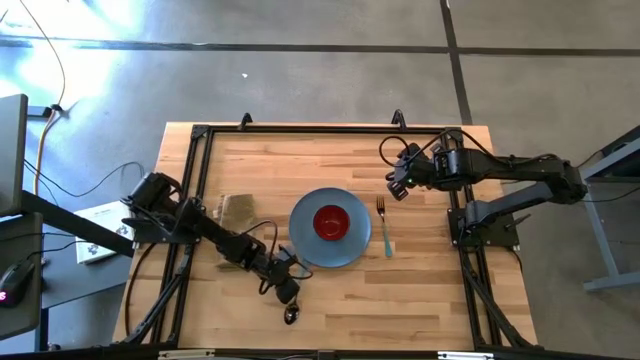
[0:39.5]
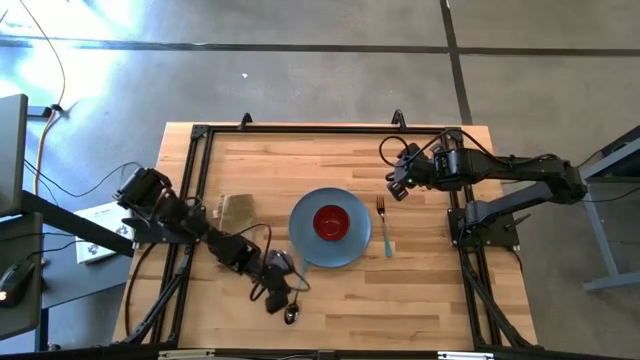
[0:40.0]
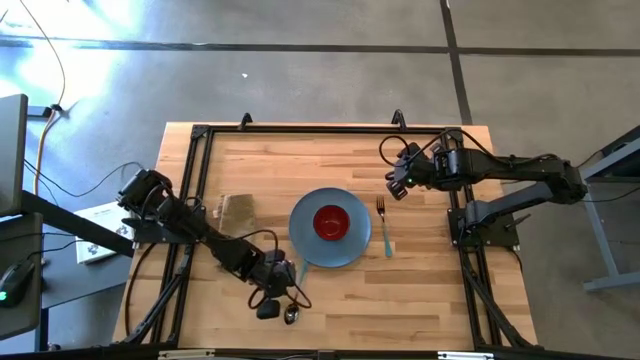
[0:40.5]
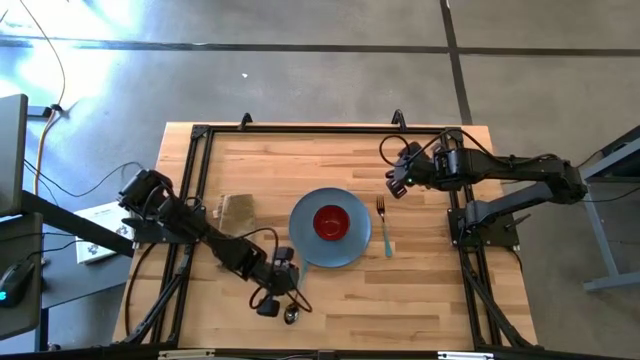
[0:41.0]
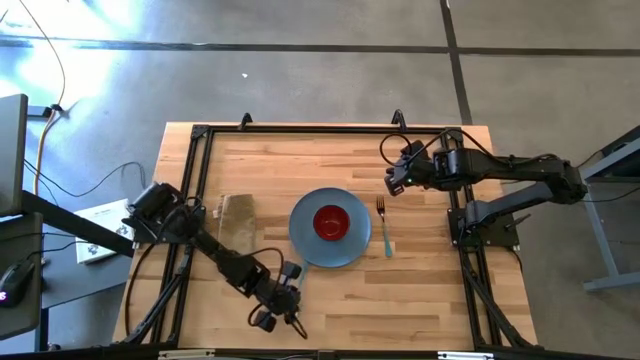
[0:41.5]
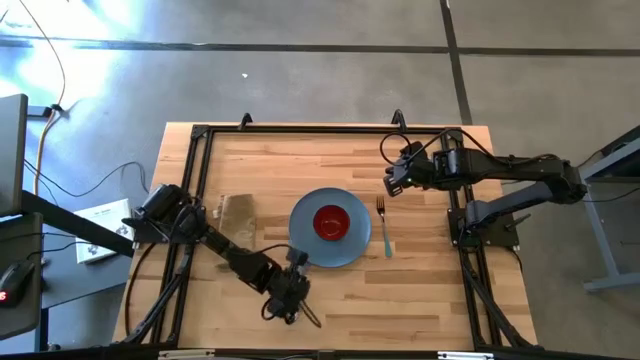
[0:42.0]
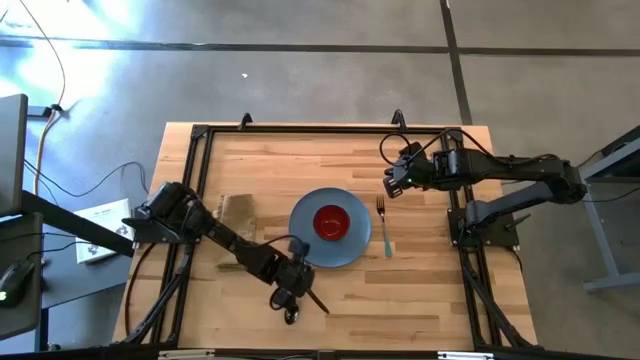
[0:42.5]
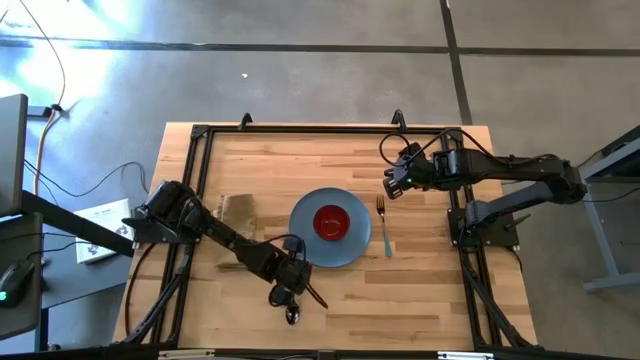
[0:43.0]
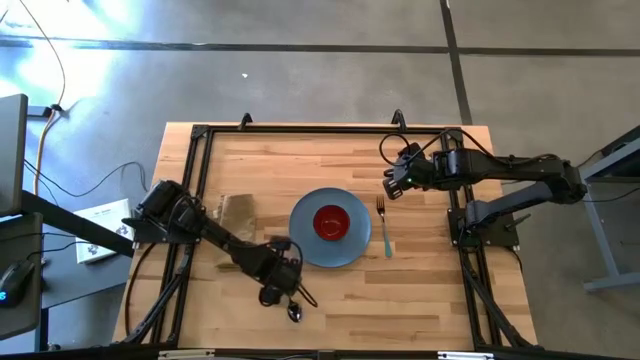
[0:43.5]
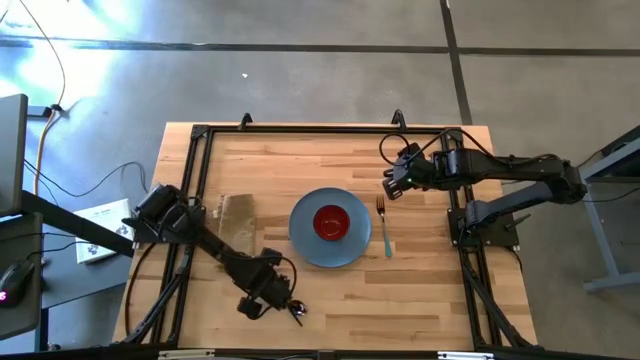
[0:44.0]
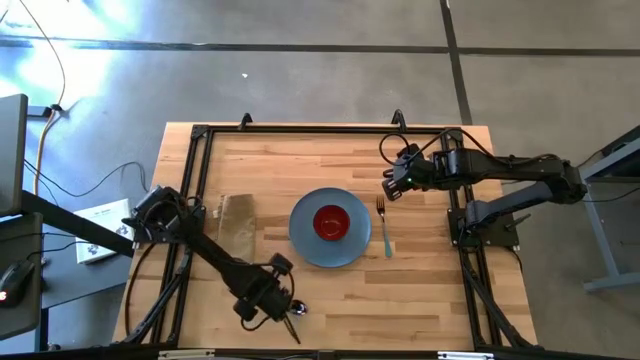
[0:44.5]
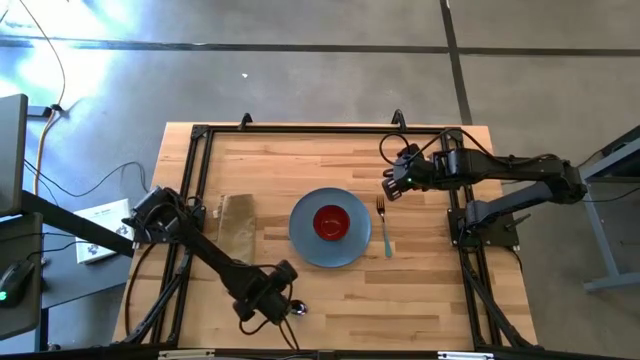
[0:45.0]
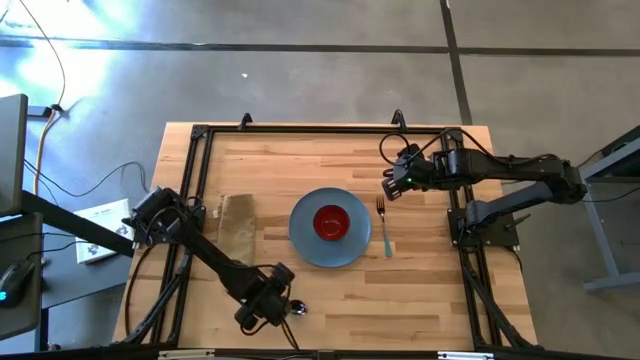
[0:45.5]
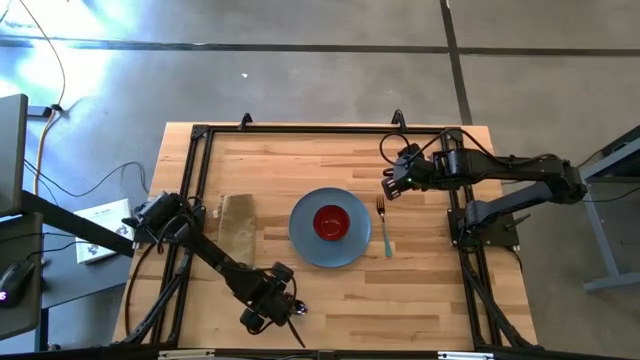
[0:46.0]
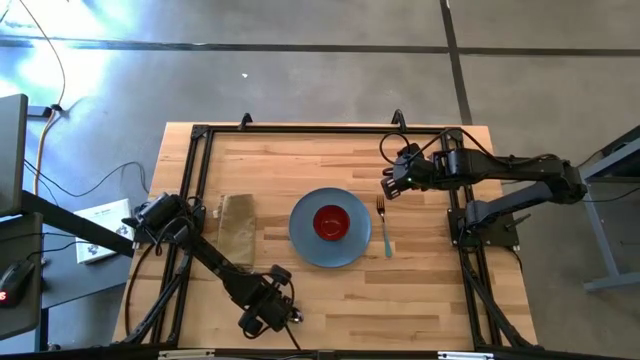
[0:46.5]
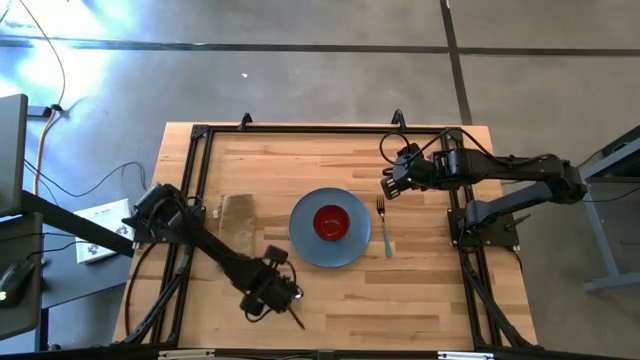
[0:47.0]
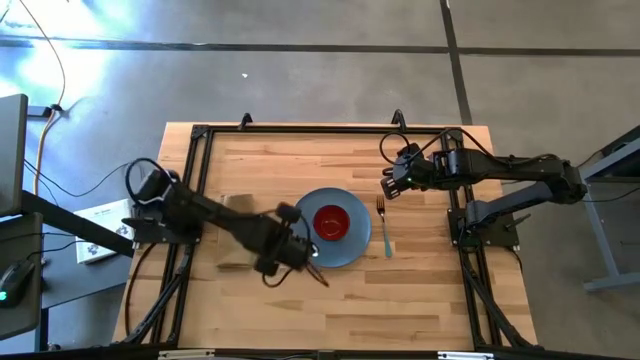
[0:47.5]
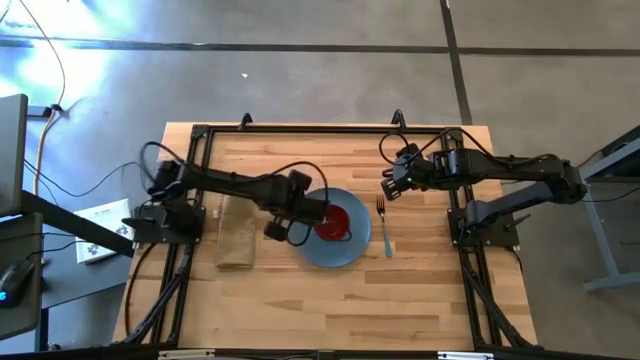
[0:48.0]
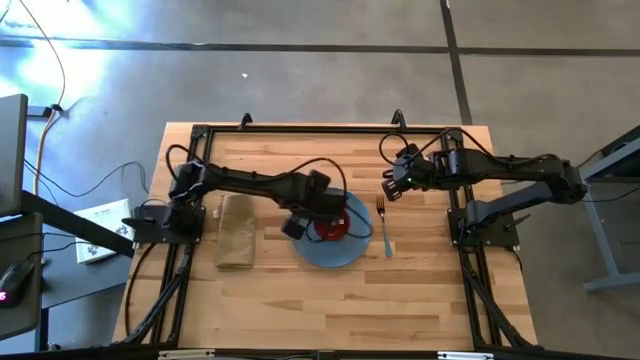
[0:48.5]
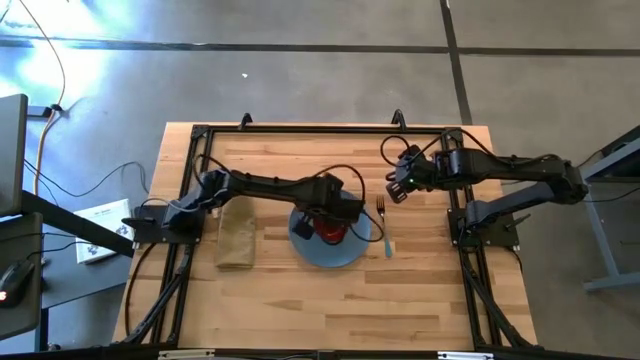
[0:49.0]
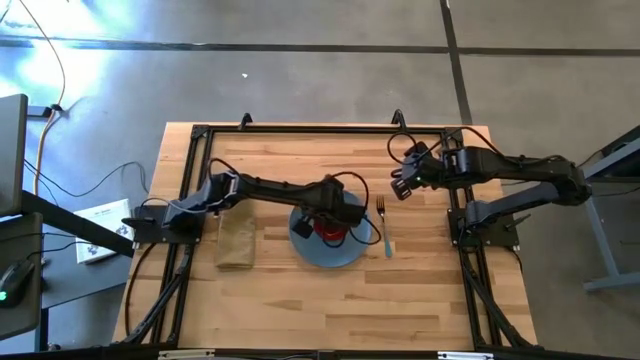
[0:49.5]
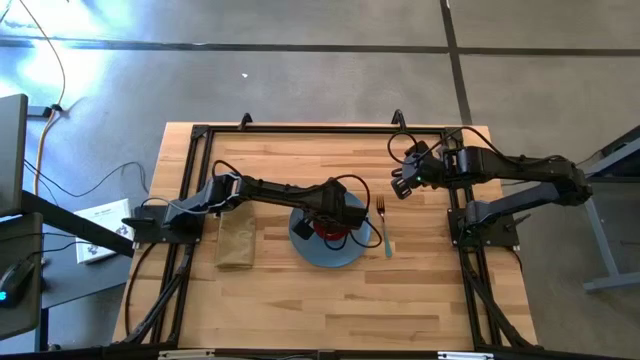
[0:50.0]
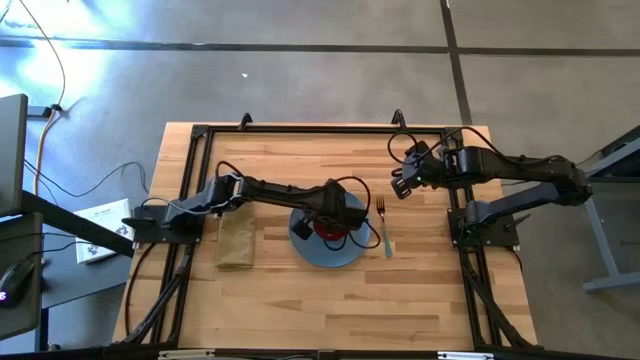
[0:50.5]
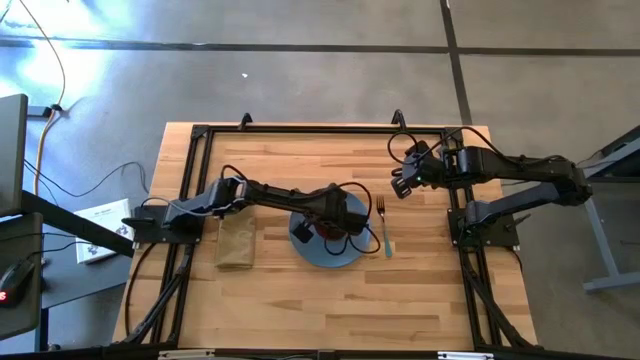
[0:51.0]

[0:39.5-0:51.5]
Task: Set table place
Put the blue spoon into the black bowl

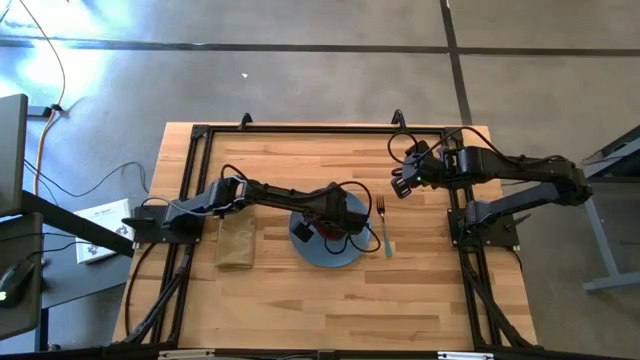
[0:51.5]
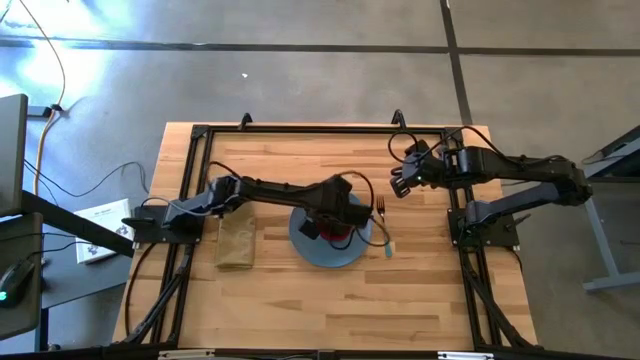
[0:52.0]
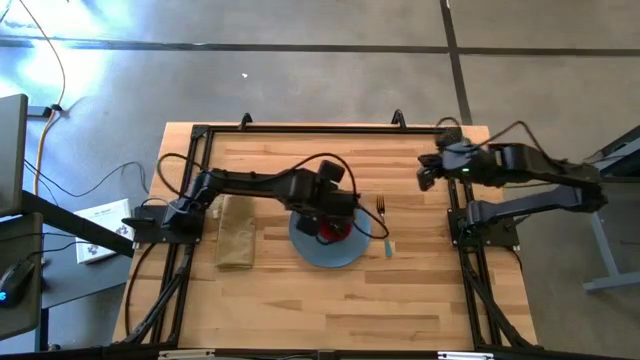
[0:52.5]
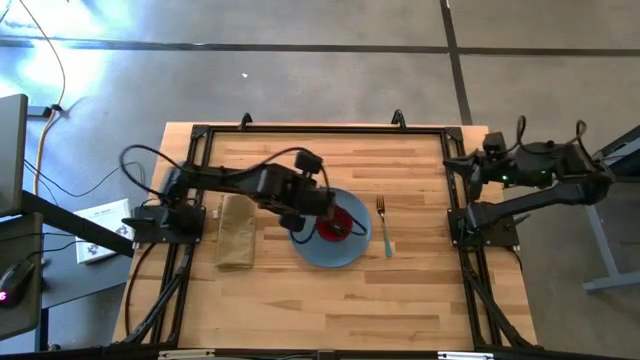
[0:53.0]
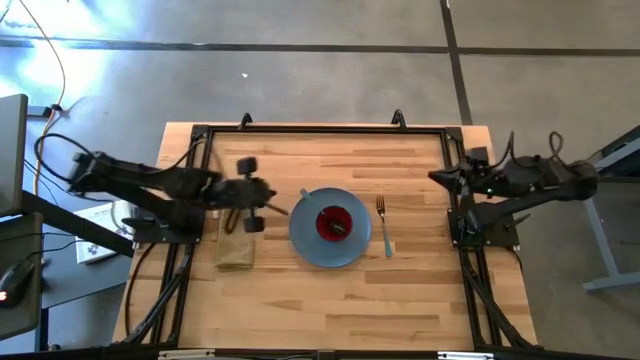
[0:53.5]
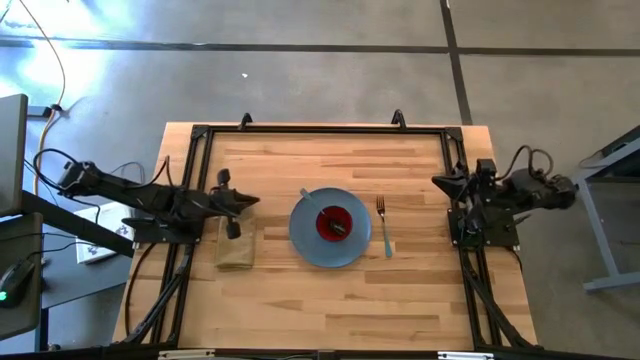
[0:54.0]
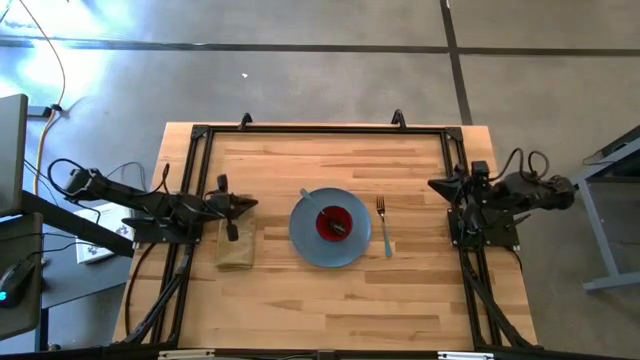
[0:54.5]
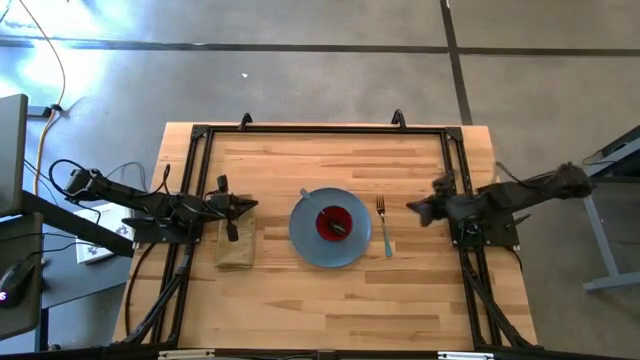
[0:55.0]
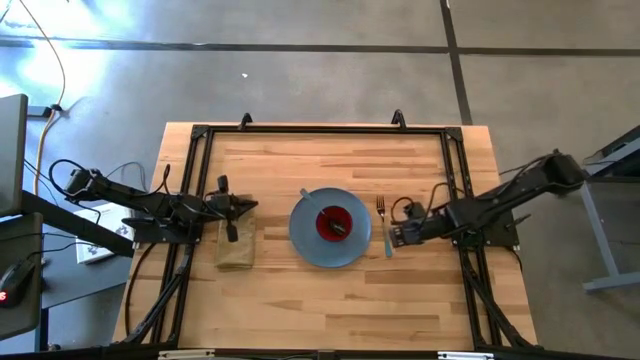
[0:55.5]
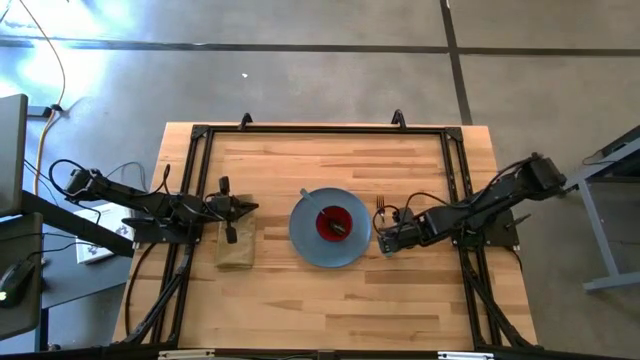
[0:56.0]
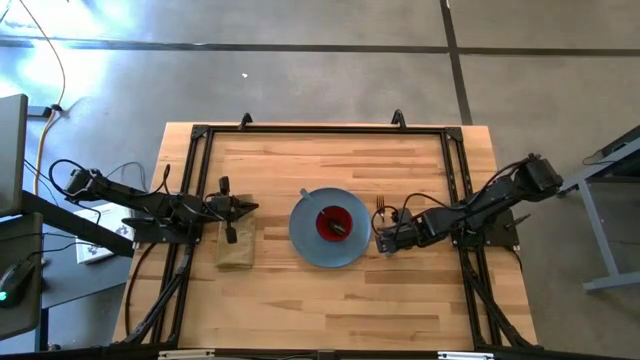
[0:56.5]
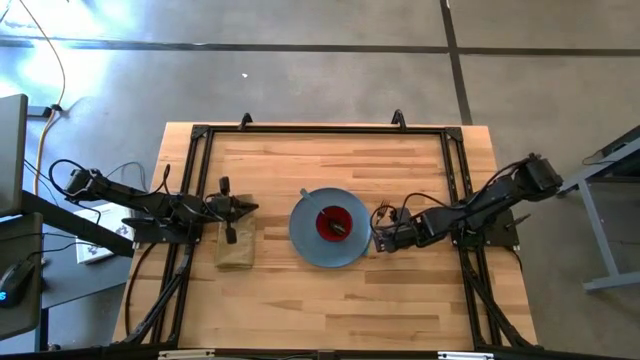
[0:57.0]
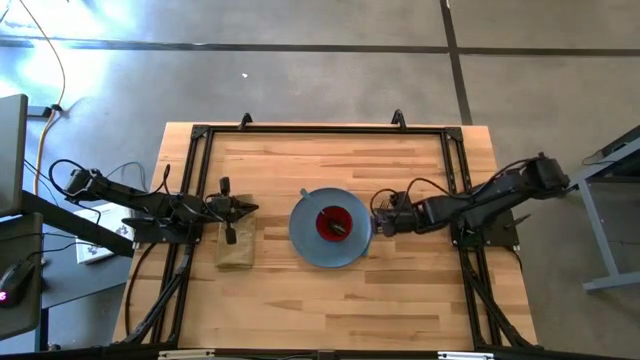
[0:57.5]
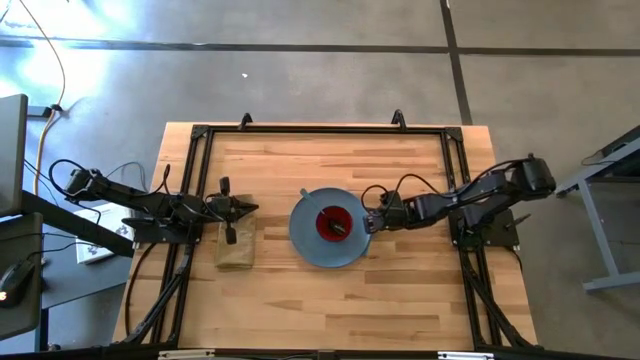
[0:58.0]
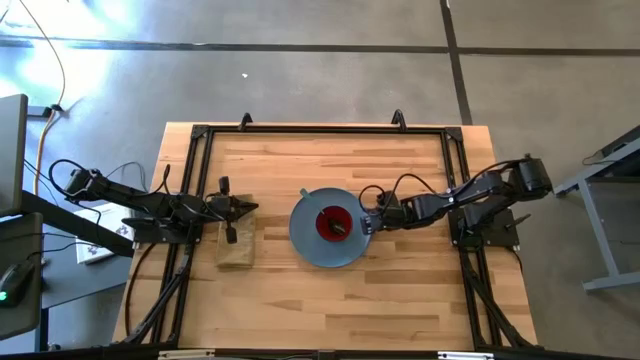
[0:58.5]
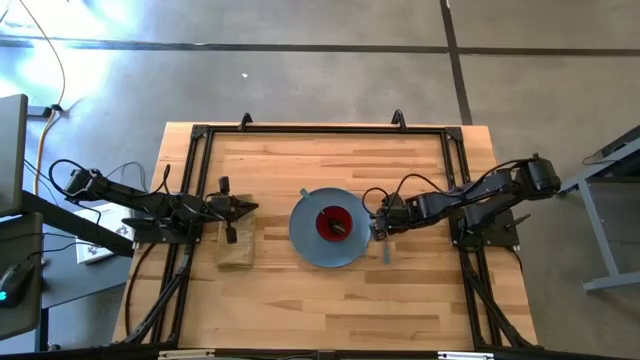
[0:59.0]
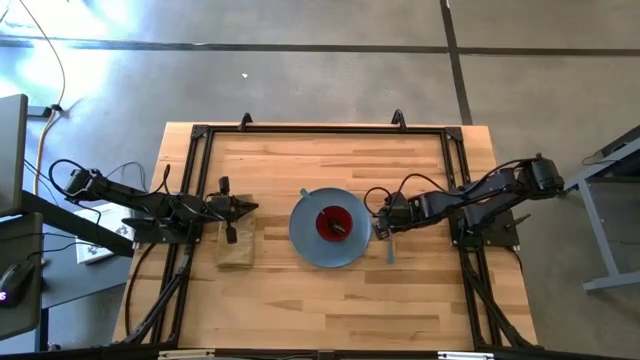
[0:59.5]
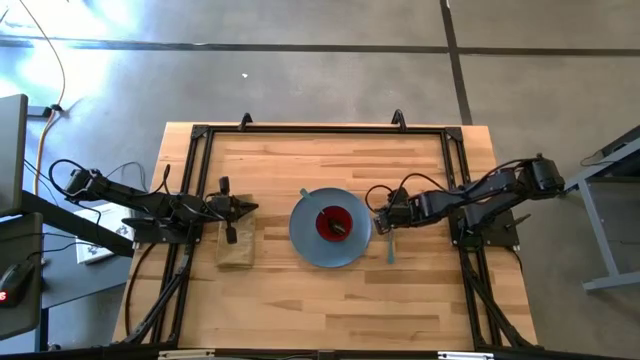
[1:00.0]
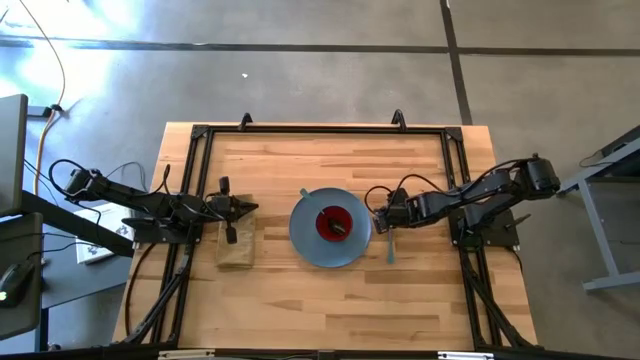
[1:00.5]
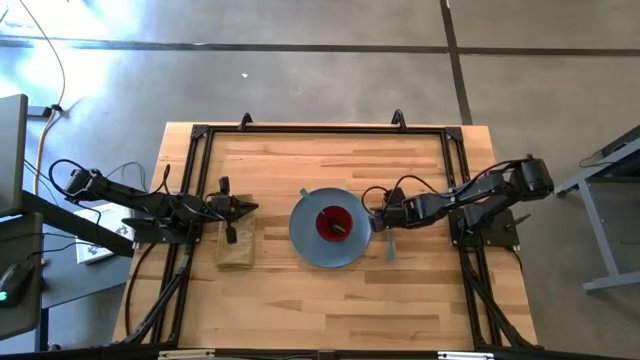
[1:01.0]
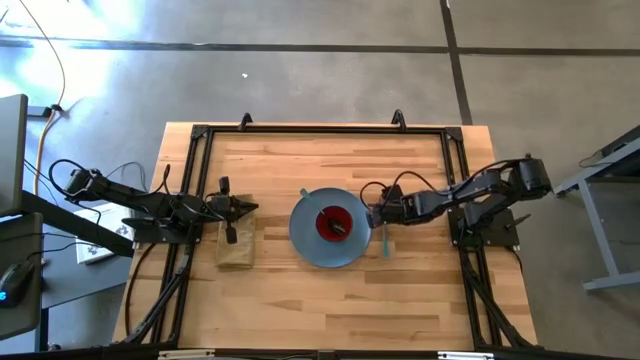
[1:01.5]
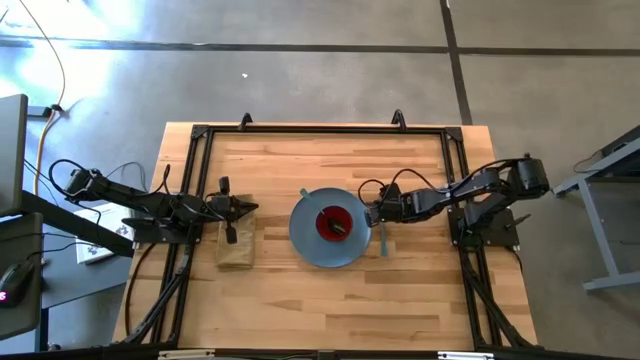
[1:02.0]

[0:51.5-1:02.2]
Adjust the blue fork
